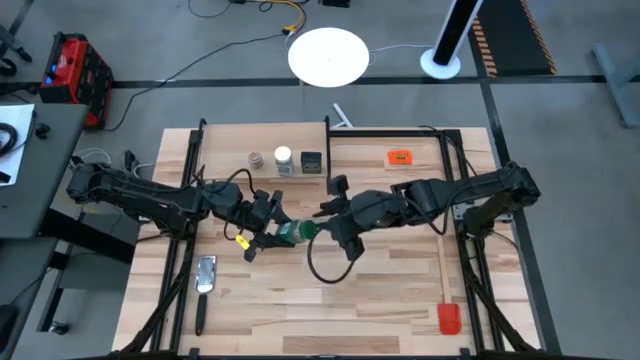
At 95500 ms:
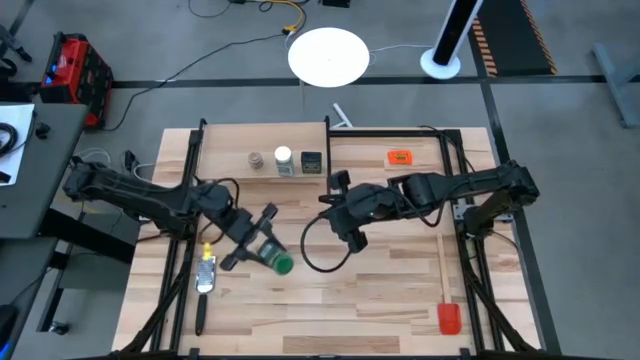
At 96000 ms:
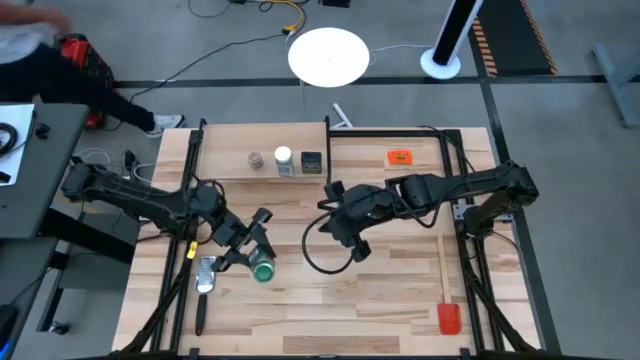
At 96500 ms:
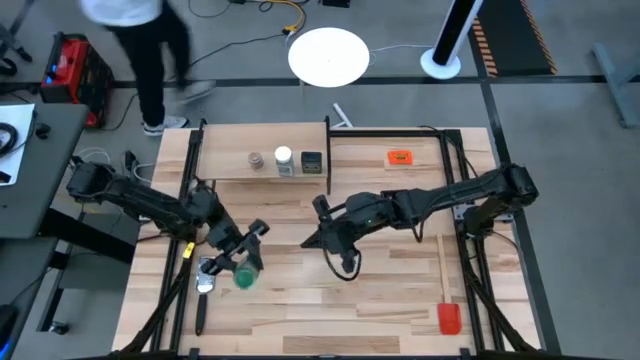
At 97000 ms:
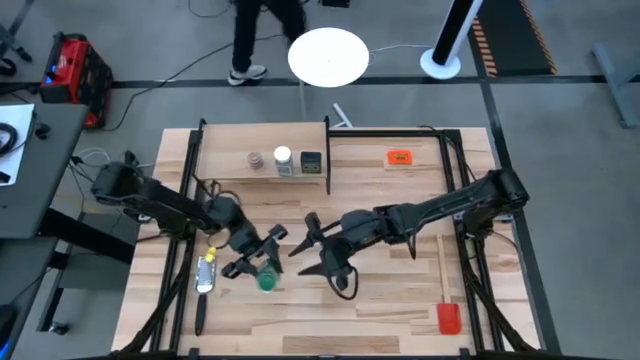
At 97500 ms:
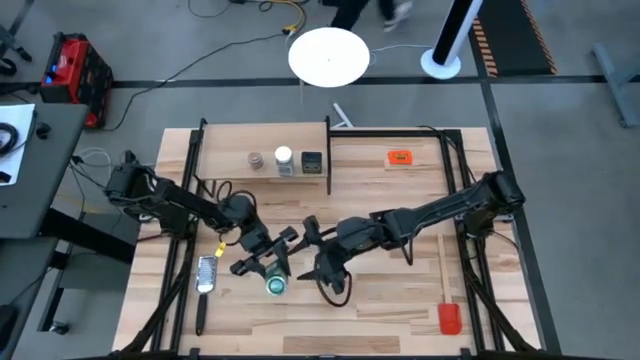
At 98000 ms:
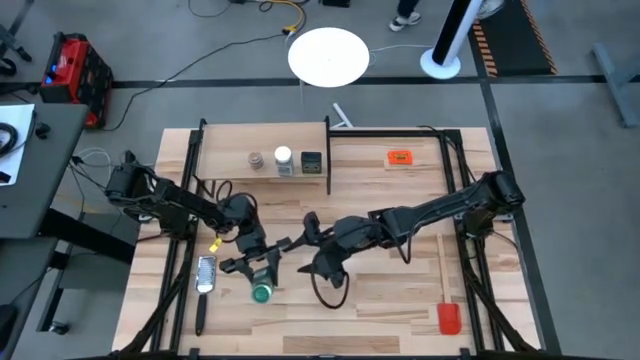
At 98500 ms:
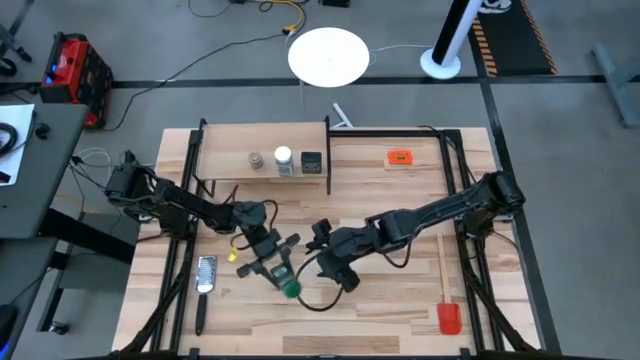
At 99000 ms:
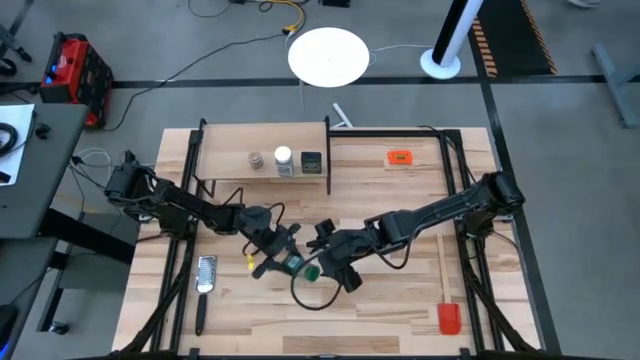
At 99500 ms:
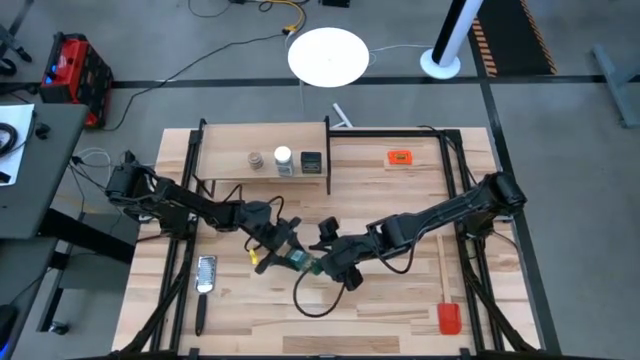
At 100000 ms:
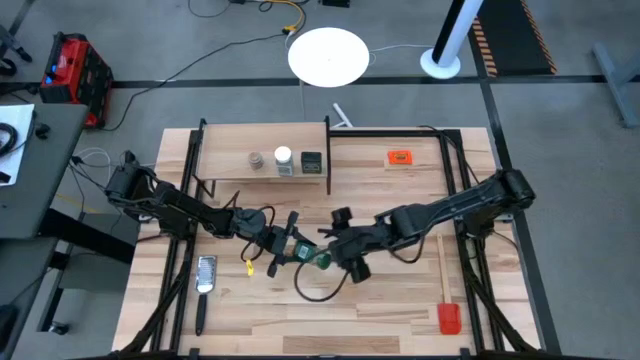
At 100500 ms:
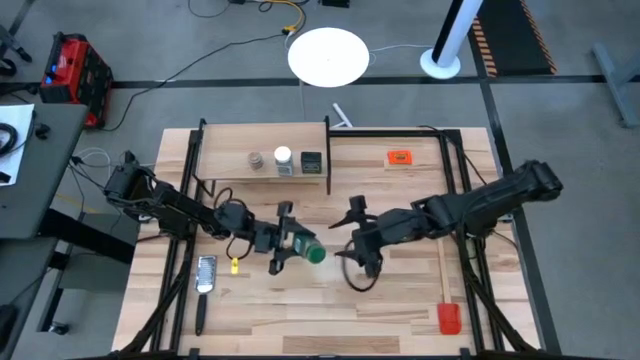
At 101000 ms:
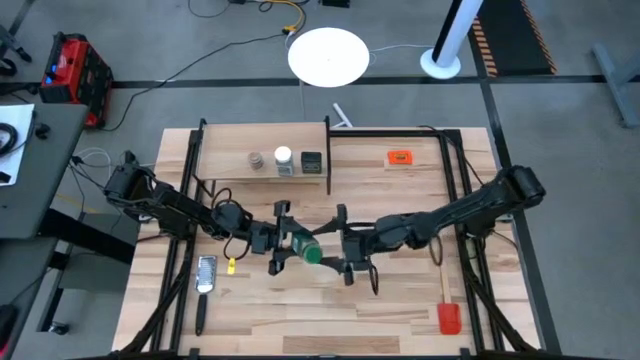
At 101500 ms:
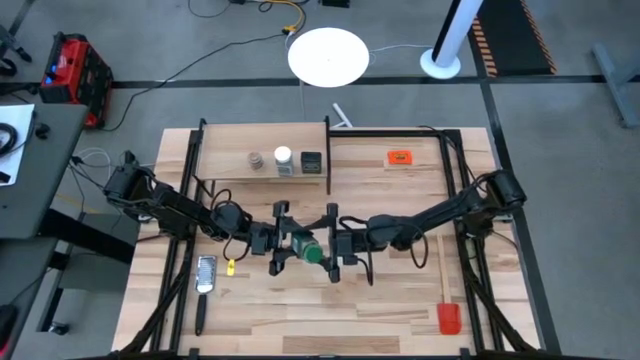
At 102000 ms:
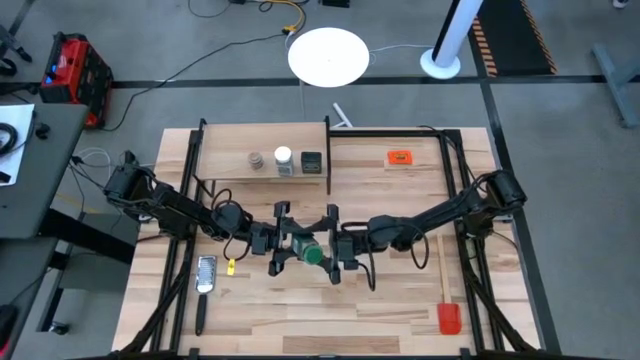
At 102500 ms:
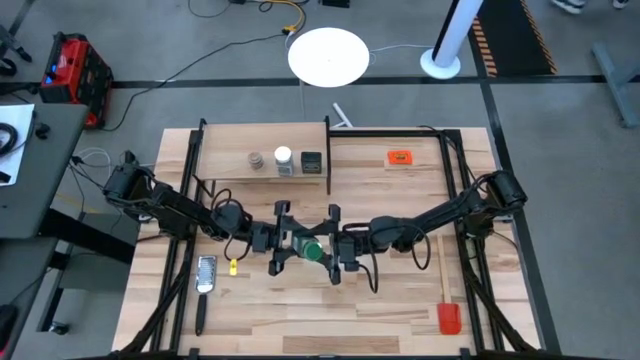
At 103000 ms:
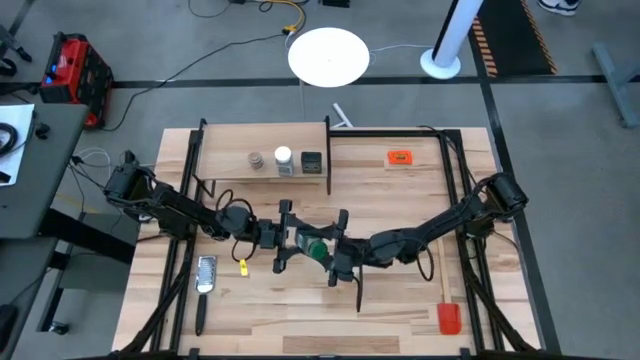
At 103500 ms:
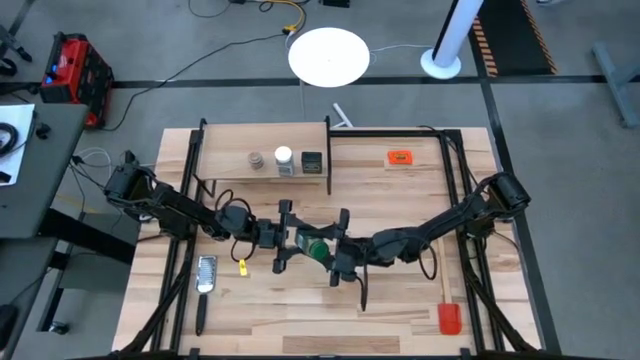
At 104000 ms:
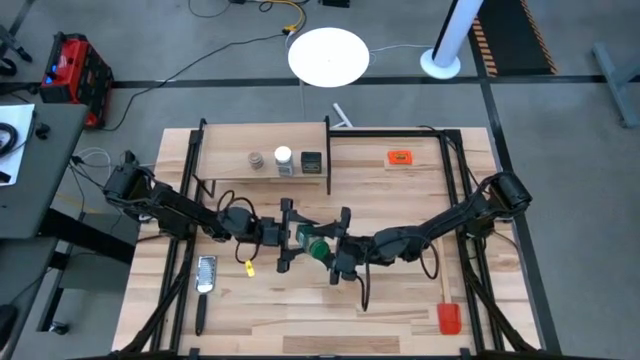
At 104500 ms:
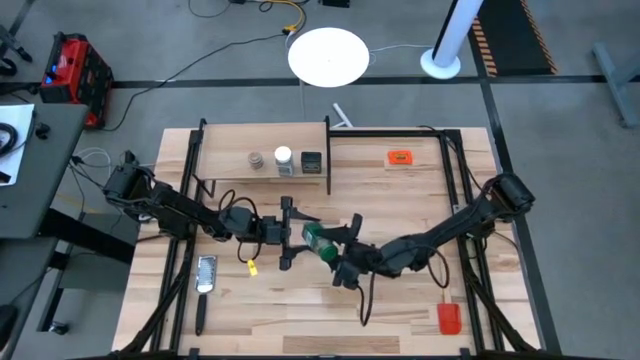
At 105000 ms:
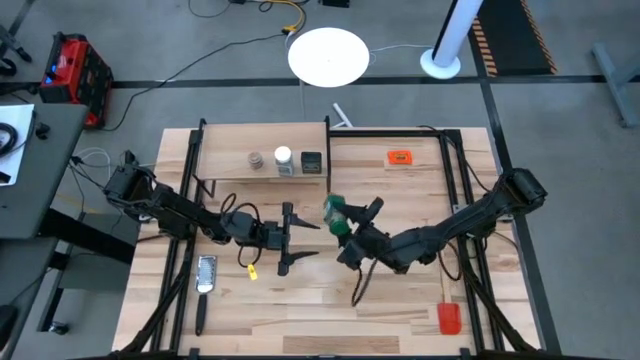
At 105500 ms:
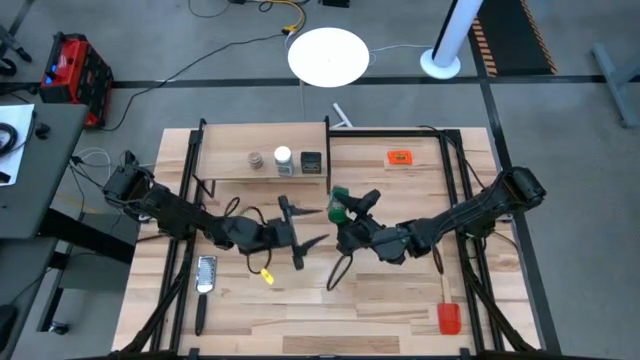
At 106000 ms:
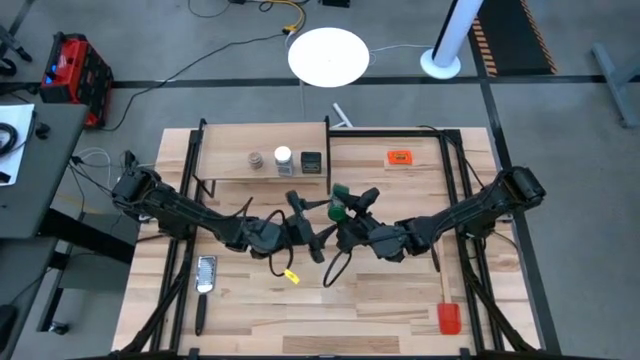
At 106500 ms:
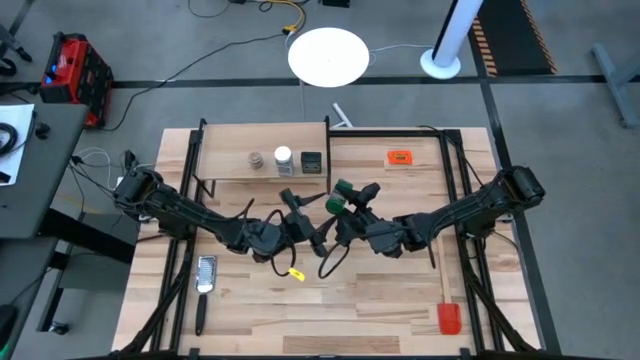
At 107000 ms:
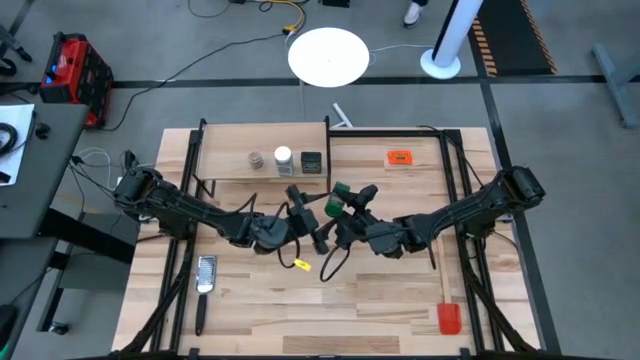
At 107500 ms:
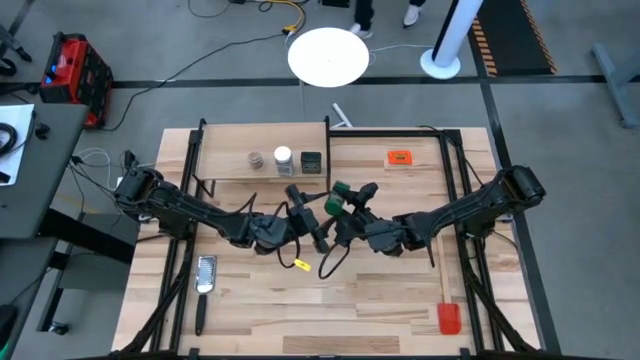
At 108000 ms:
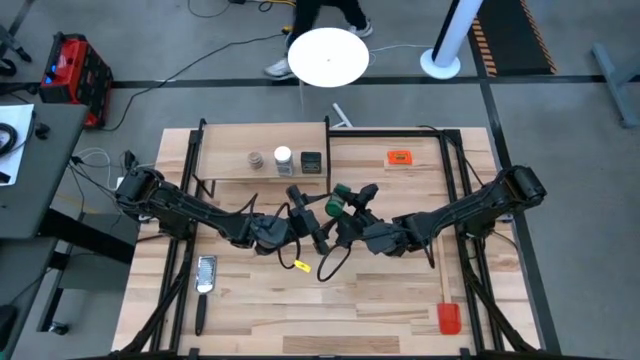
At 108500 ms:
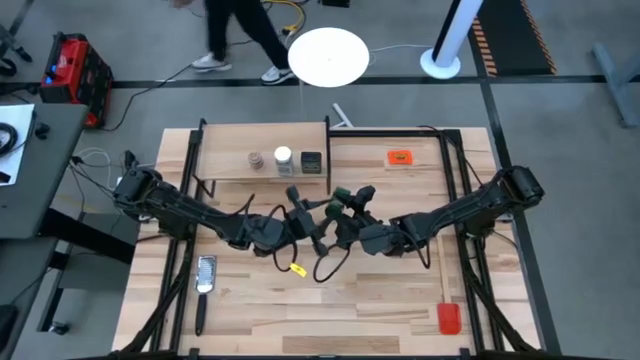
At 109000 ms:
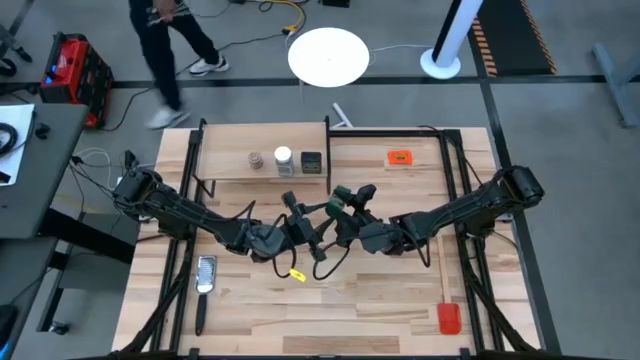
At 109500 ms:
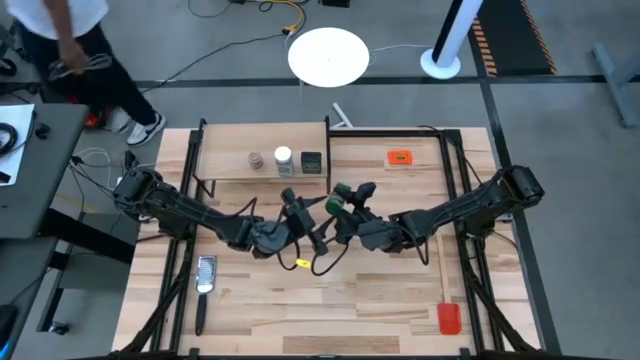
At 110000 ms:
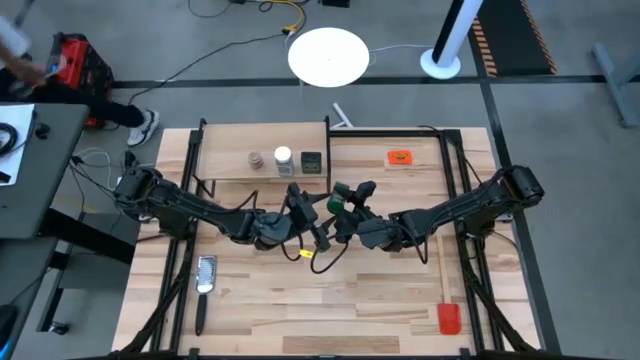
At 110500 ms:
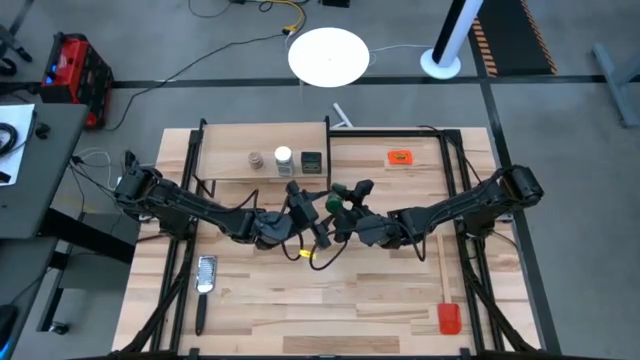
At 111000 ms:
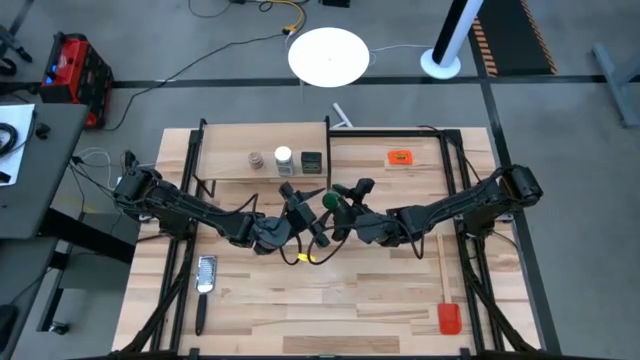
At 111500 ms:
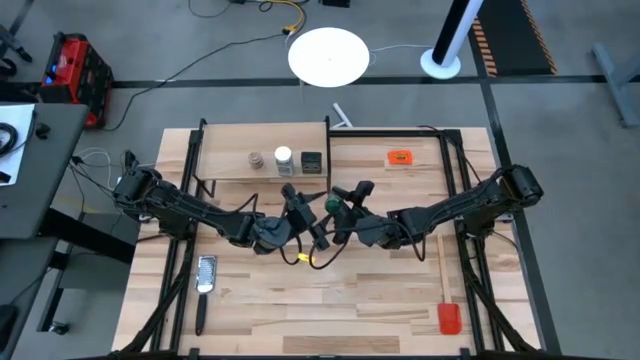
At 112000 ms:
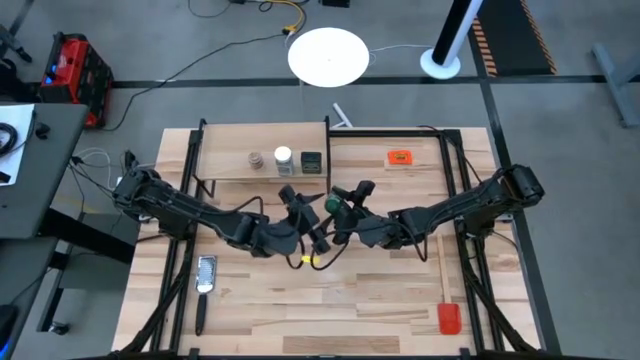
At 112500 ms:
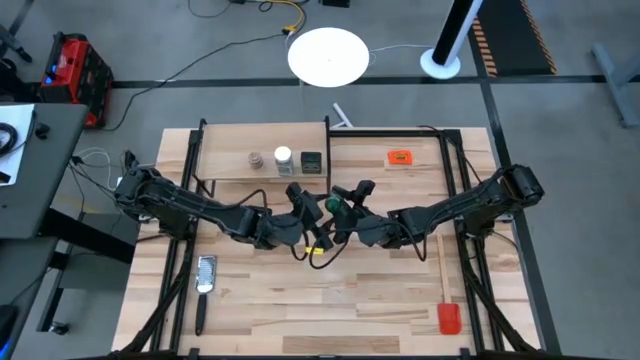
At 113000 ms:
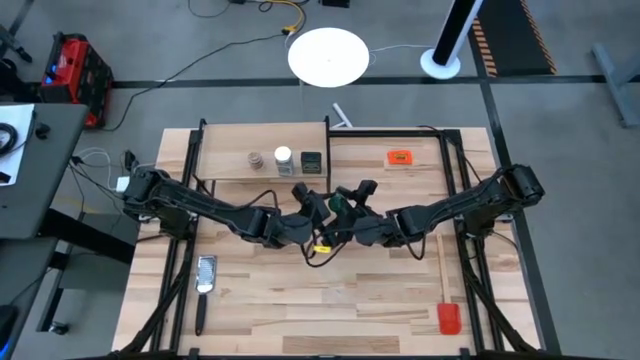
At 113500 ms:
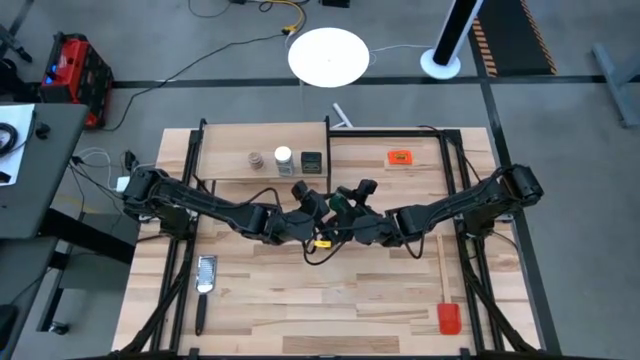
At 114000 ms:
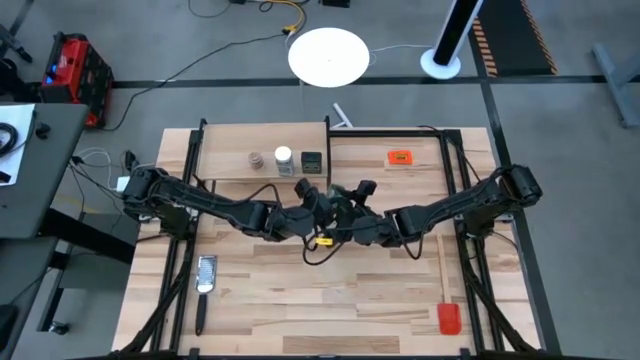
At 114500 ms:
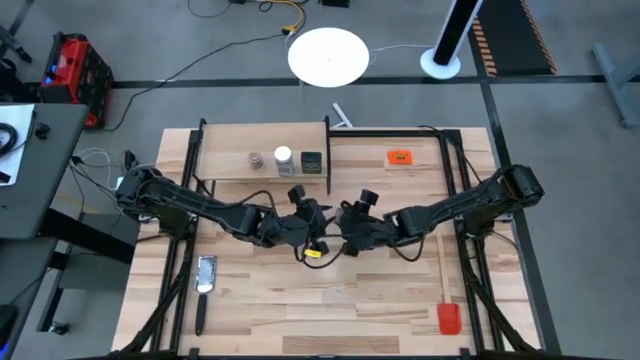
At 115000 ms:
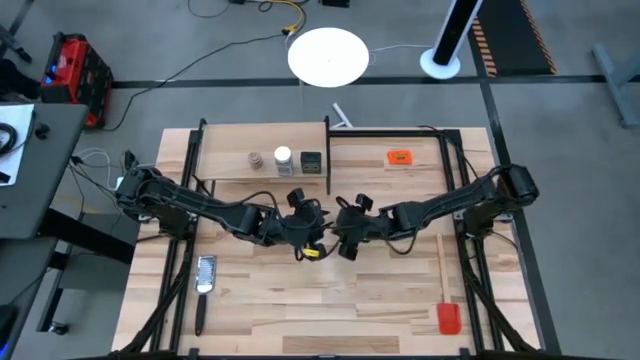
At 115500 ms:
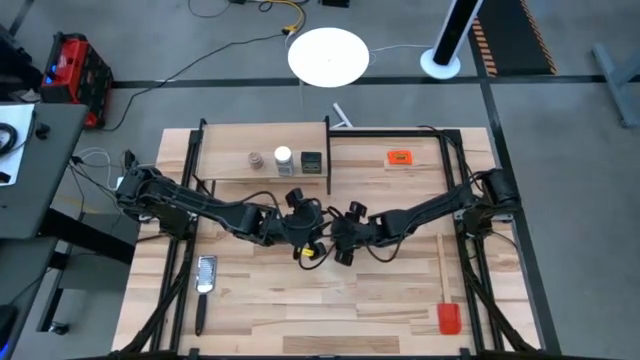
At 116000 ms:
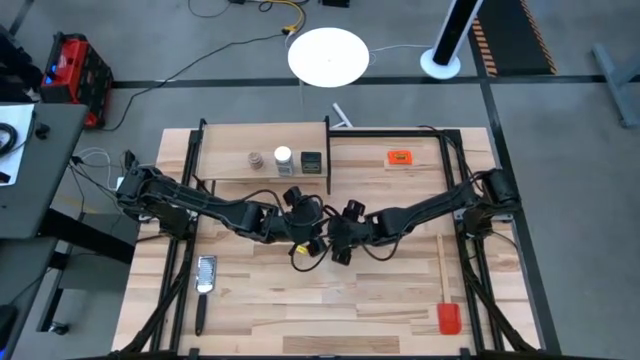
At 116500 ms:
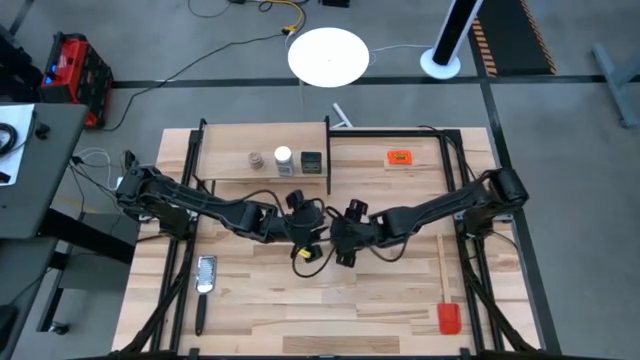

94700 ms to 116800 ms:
Task: Shelf spices
Put the green seasoning bottle on the shelf
